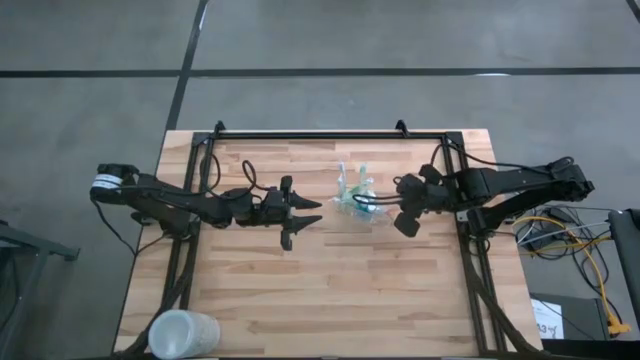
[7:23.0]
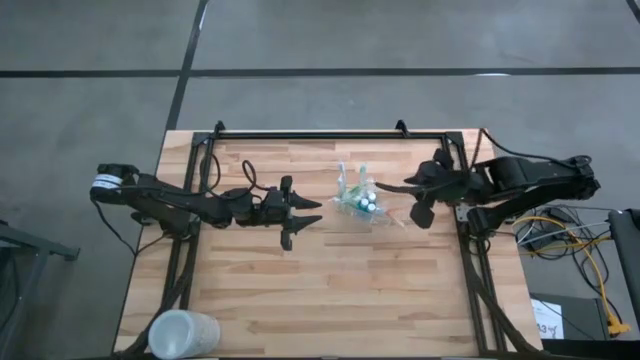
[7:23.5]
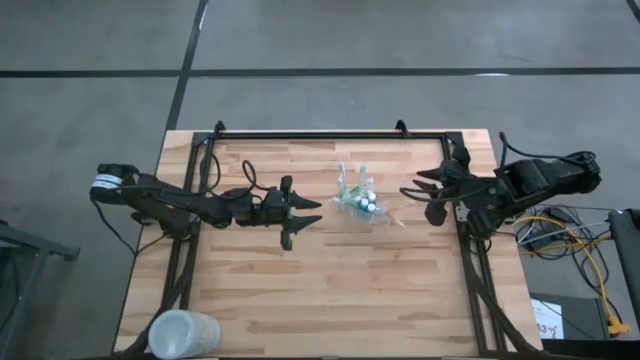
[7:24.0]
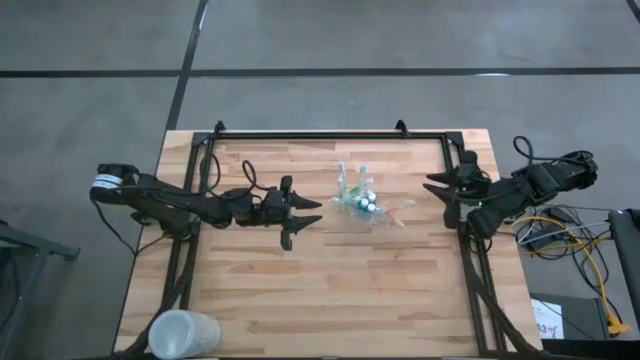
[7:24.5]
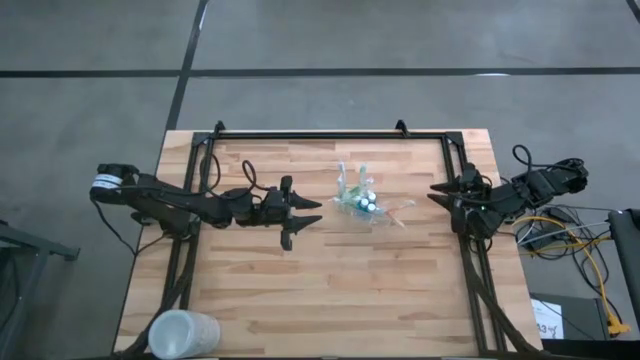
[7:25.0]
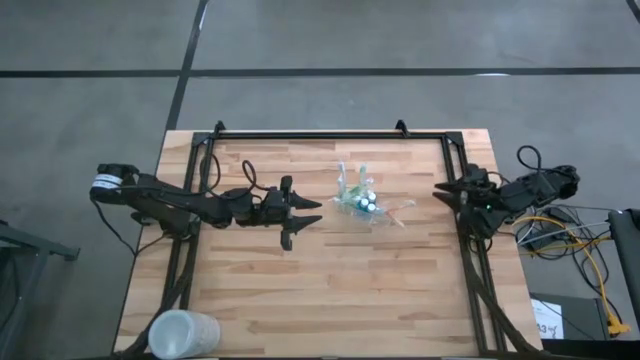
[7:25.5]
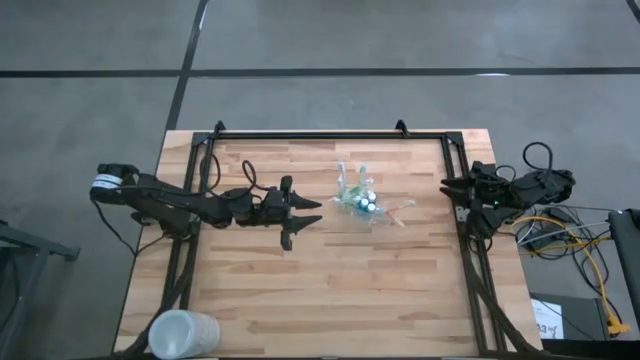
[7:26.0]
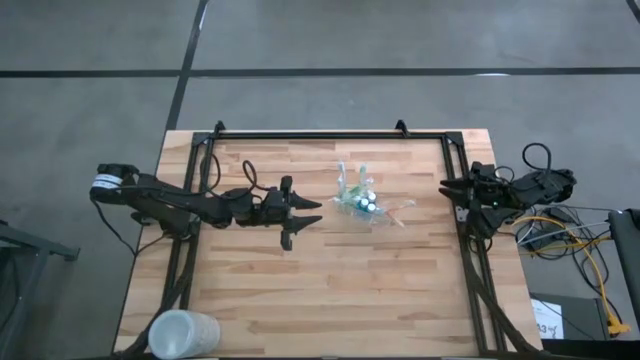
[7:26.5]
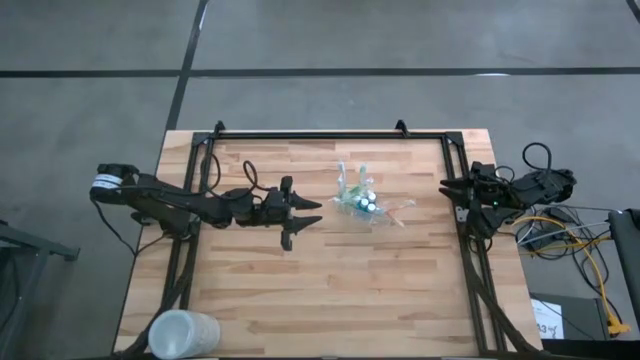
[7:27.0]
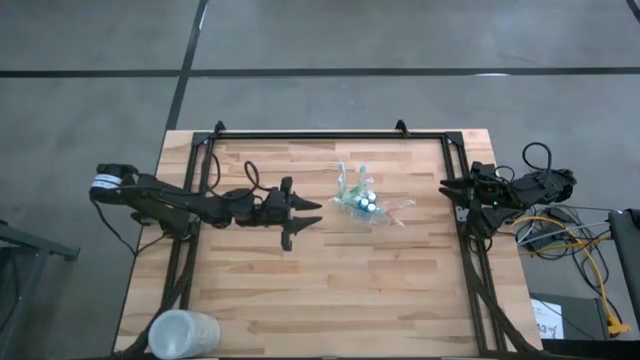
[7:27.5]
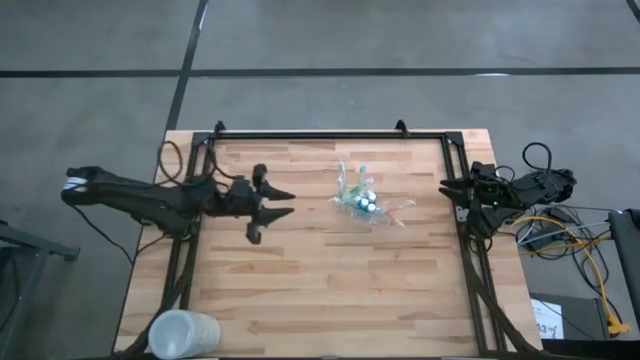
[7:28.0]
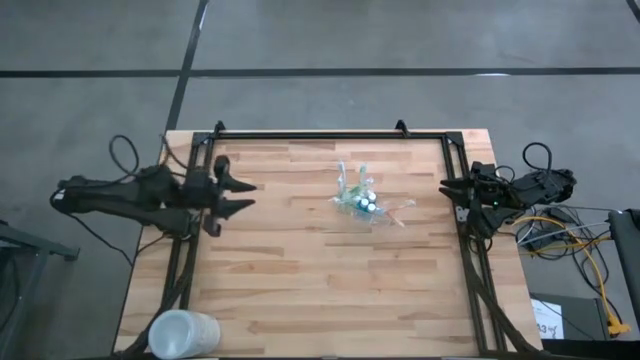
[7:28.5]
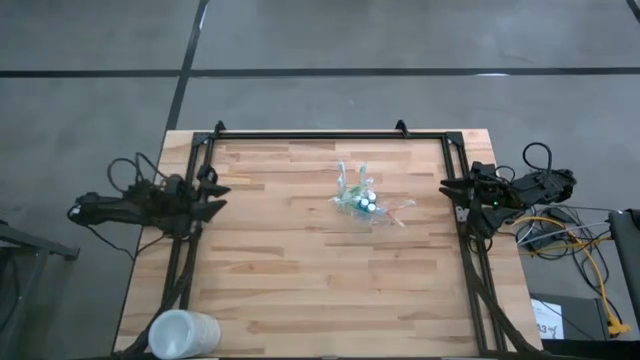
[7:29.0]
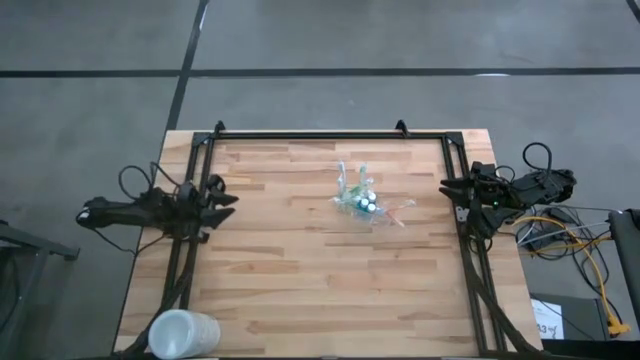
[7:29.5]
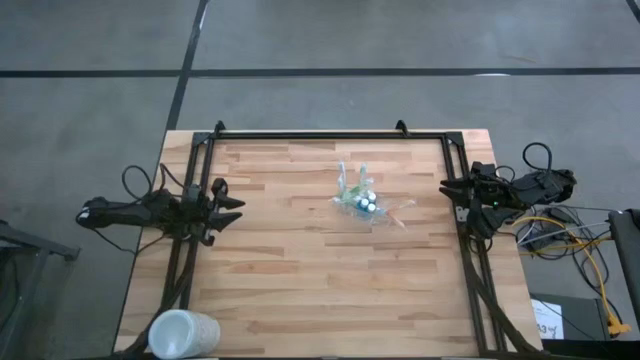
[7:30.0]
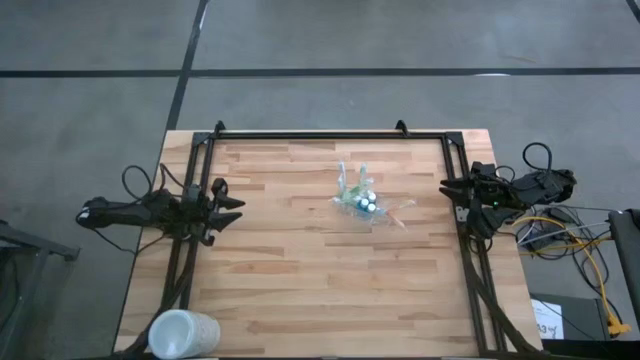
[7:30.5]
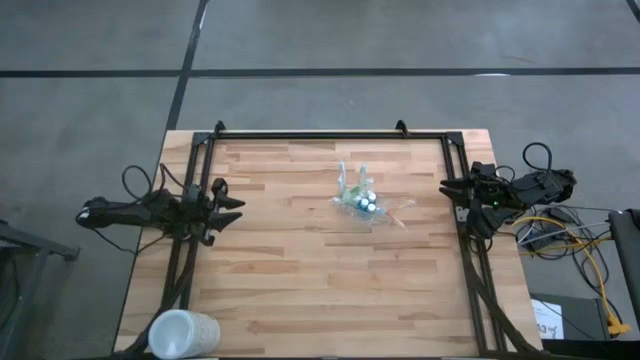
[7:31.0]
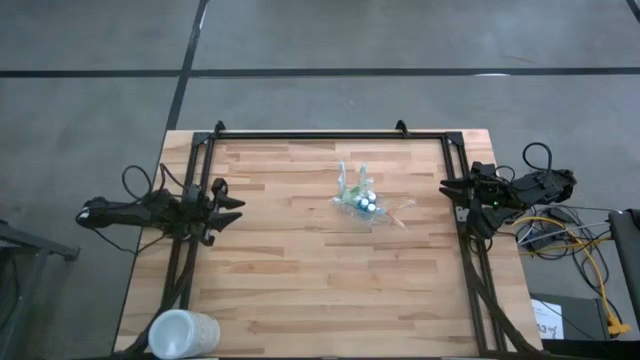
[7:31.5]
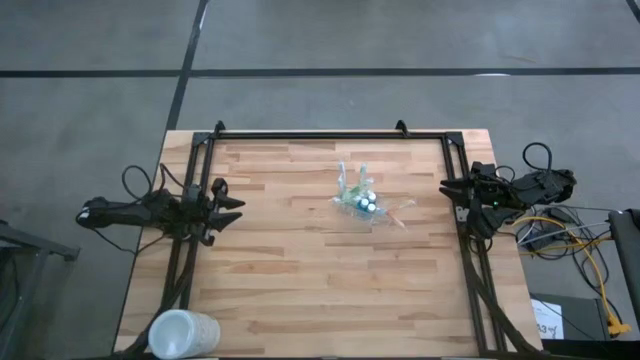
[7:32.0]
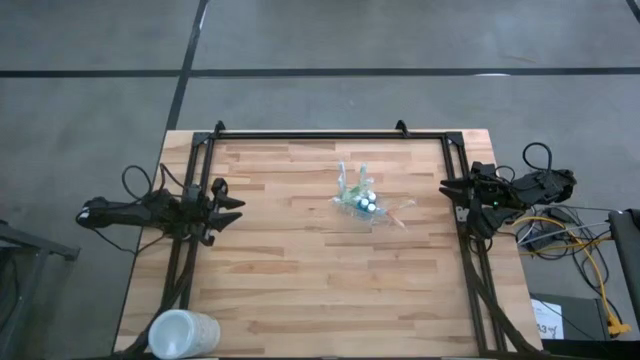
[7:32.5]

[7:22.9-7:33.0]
Task: Pick & Place toothbrushing station
Return to Home Position

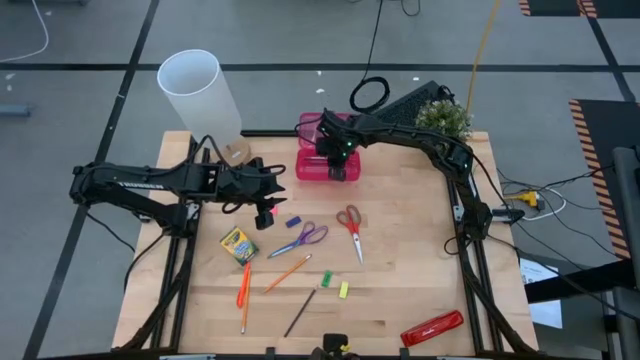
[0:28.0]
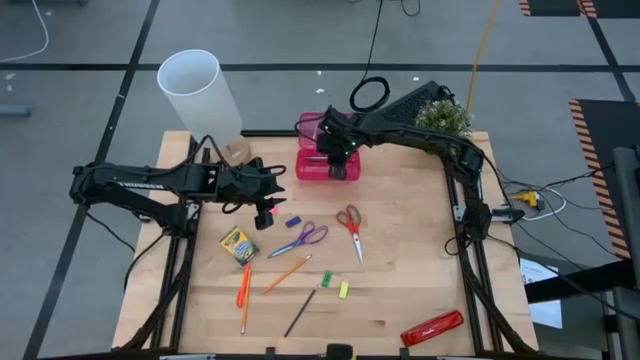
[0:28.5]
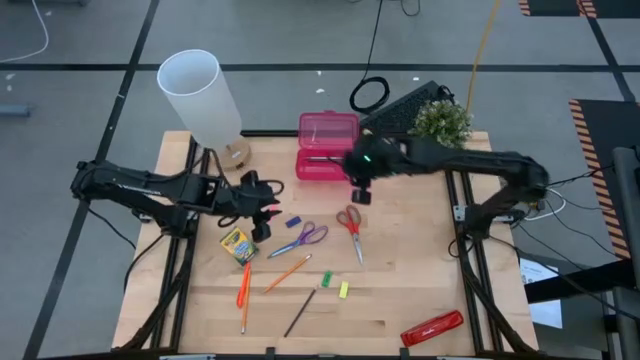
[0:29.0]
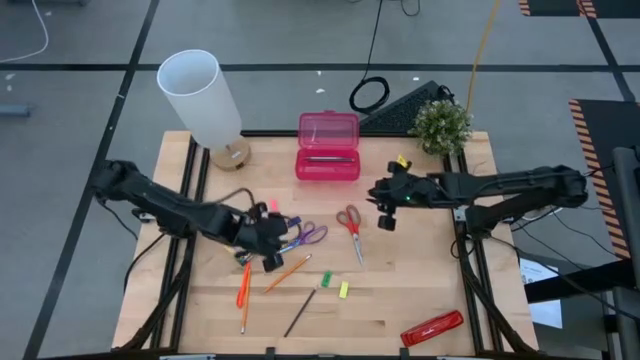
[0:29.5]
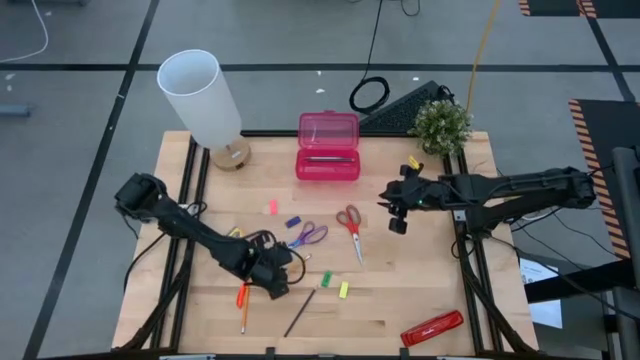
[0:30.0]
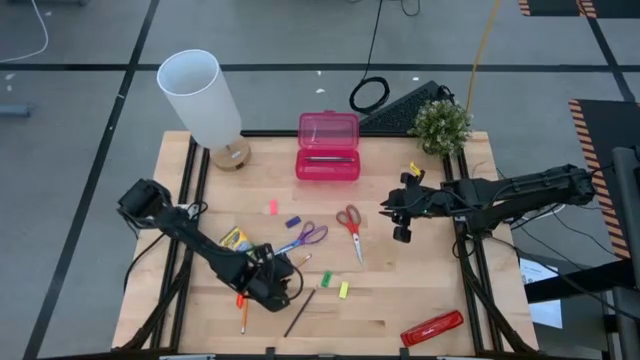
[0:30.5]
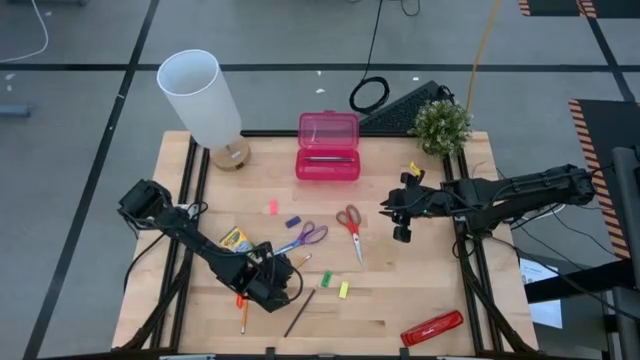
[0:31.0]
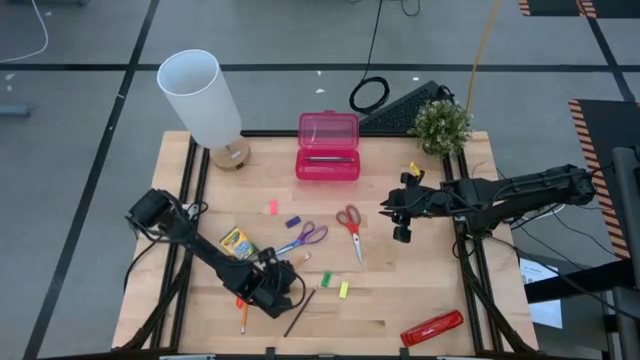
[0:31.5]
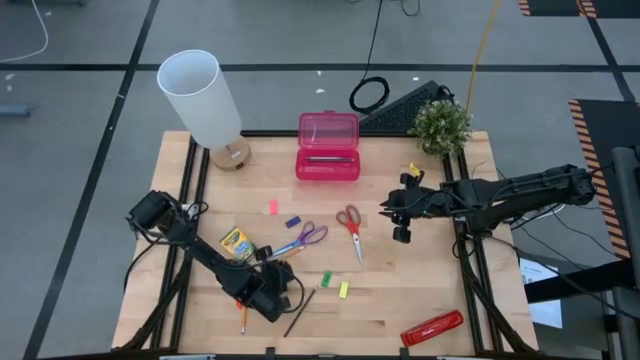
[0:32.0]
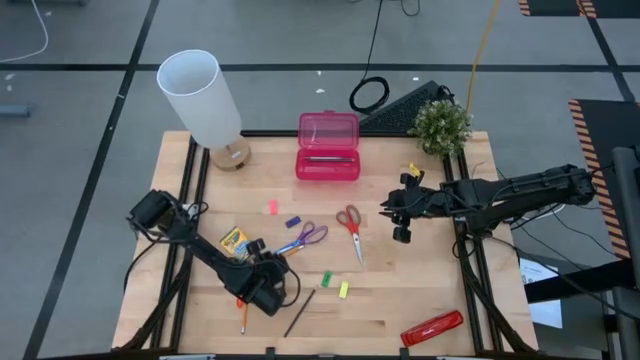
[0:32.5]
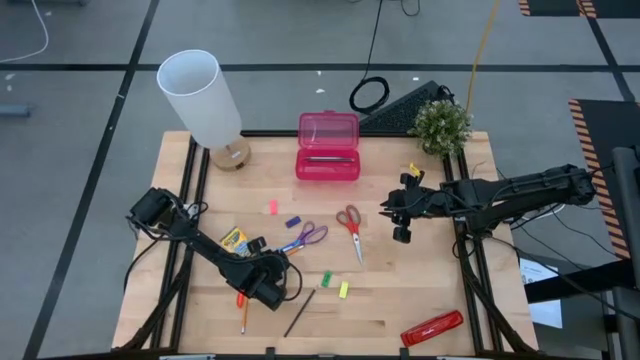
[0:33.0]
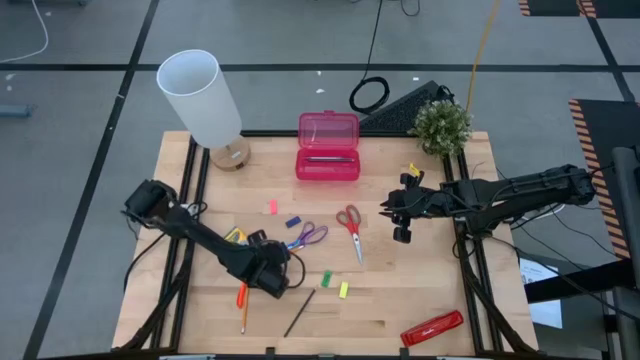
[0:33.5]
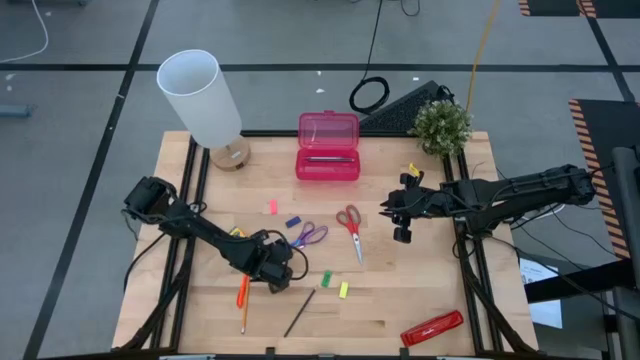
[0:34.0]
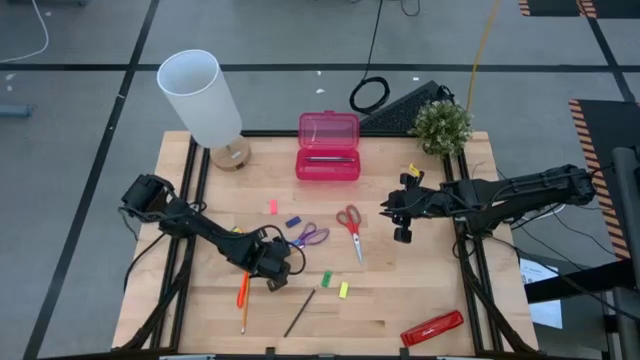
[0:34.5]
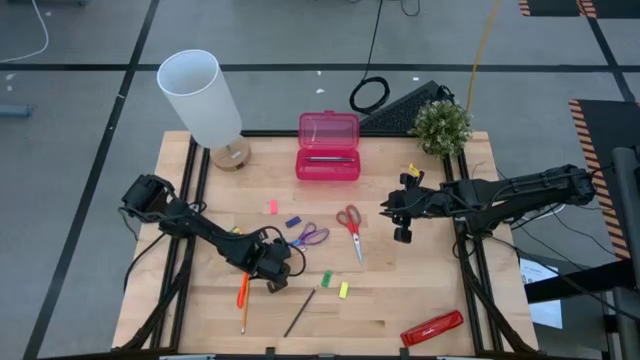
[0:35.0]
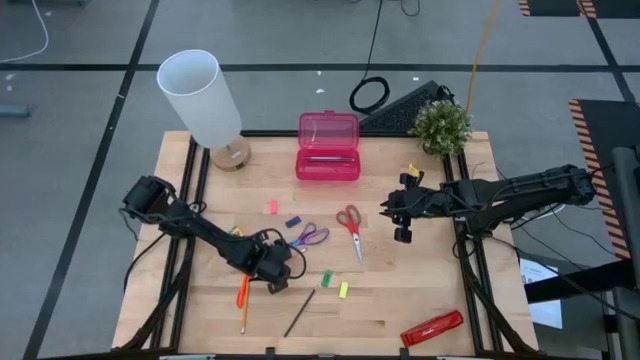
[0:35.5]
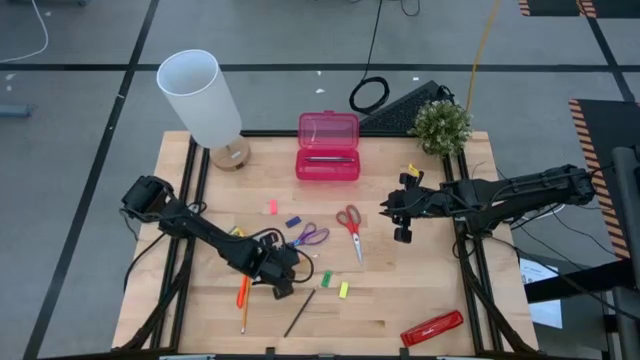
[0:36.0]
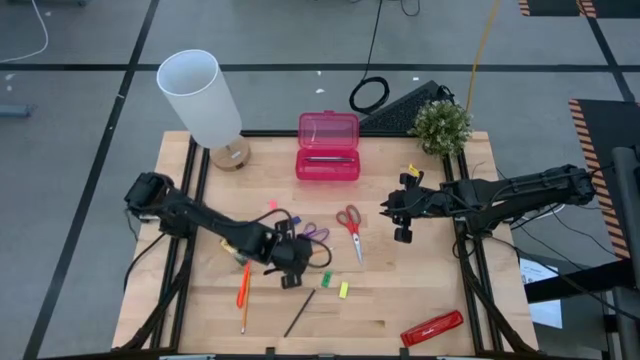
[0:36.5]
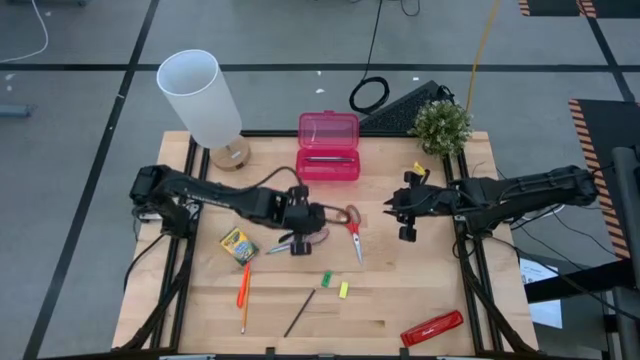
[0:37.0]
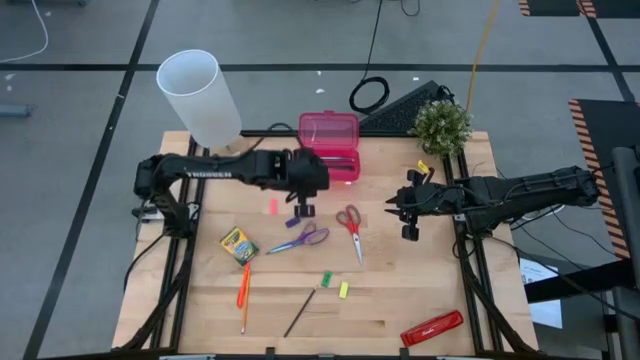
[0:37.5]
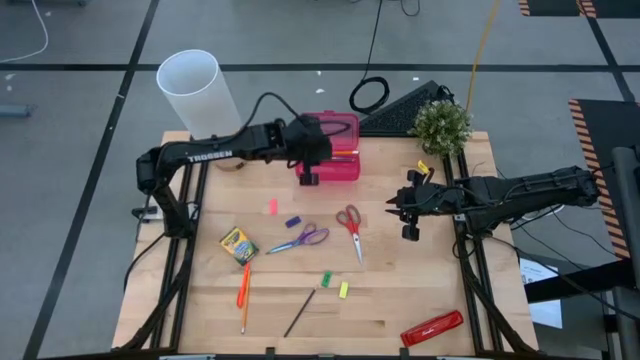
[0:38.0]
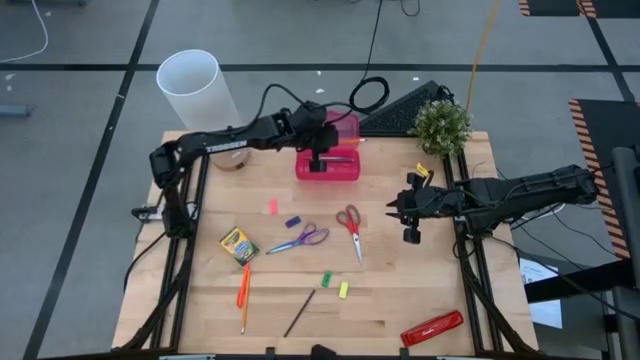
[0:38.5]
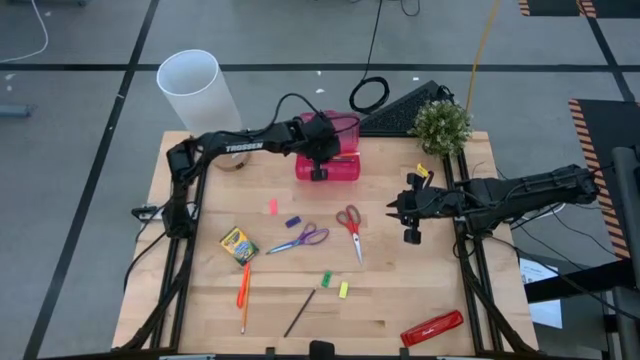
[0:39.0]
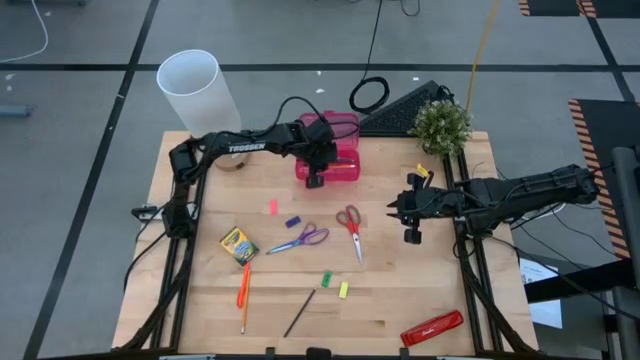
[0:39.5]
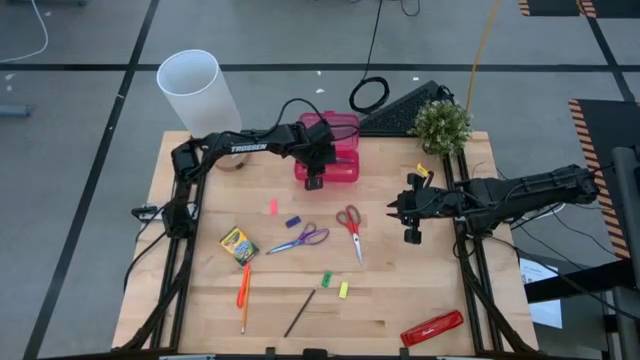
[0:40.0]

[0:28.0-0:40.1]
Task: Pack school essentials
Put the right yellow pencil into the red supply box
